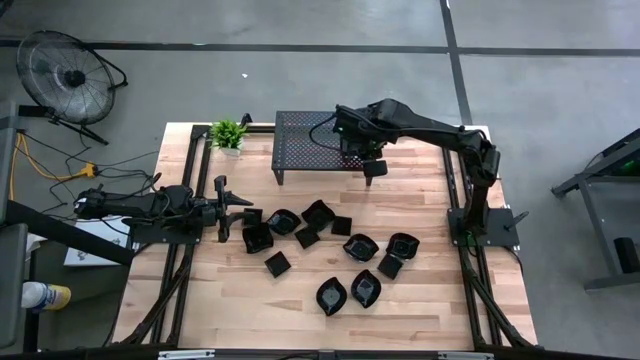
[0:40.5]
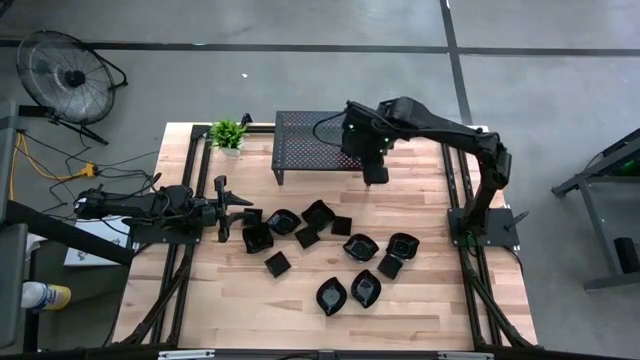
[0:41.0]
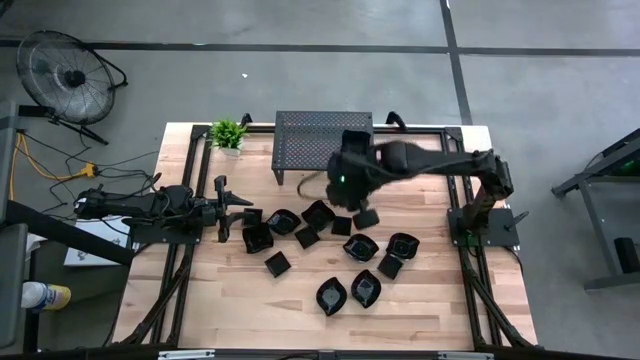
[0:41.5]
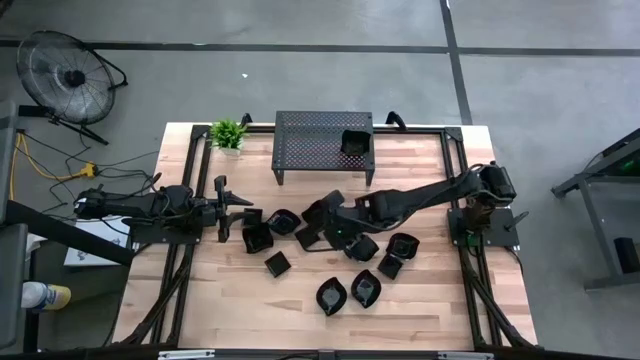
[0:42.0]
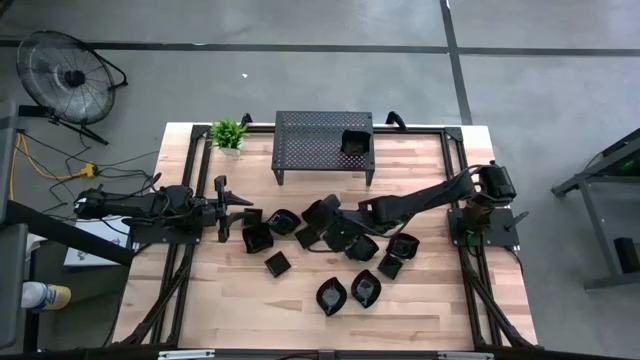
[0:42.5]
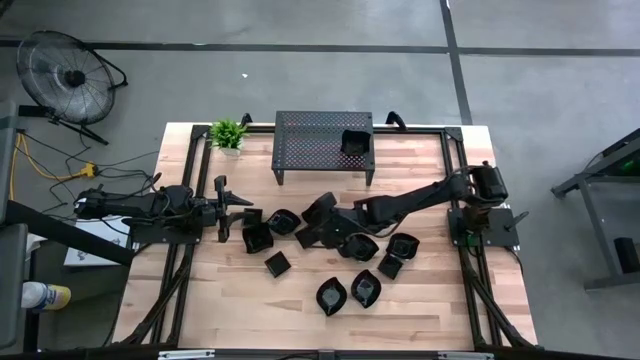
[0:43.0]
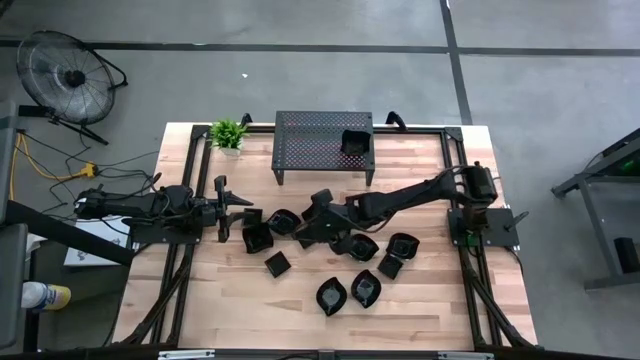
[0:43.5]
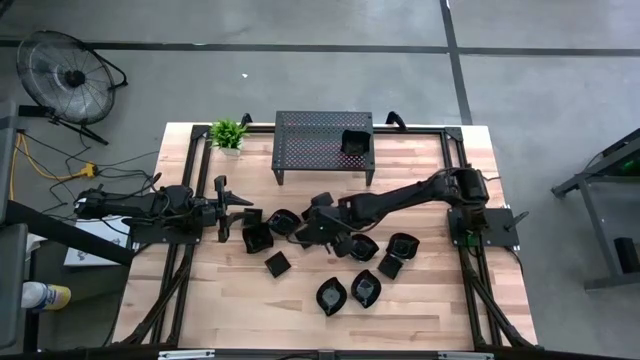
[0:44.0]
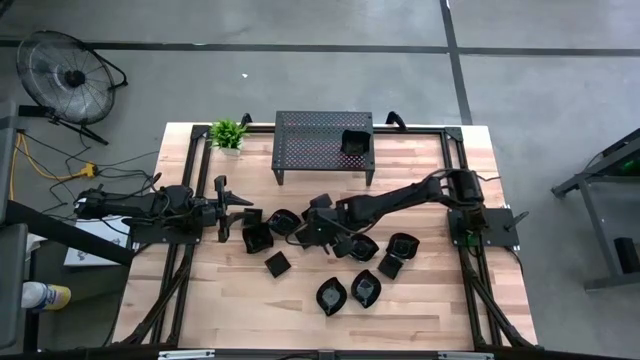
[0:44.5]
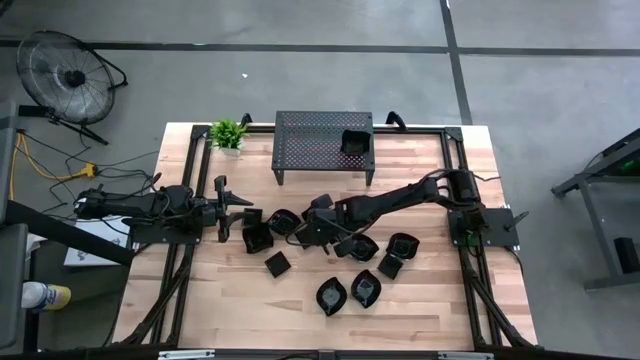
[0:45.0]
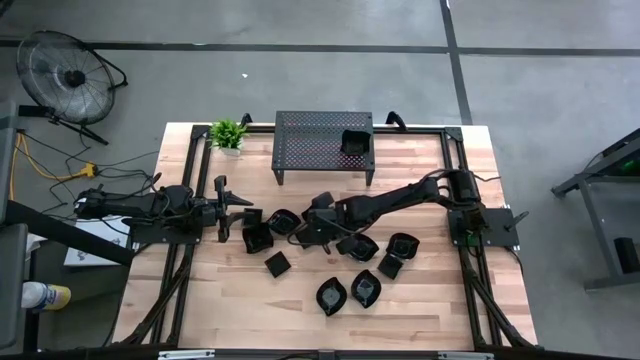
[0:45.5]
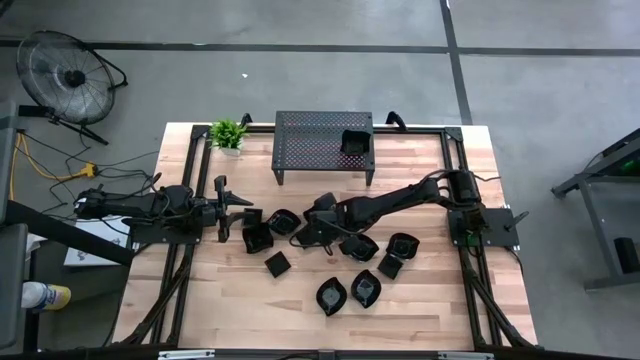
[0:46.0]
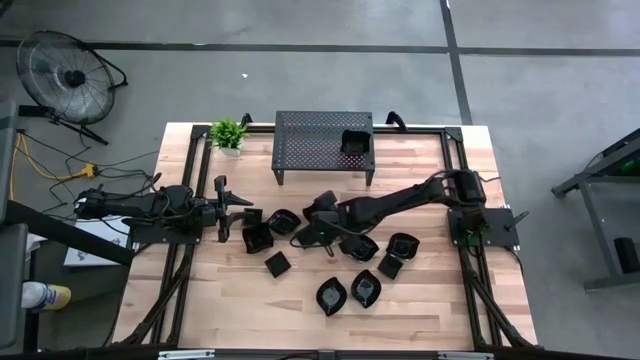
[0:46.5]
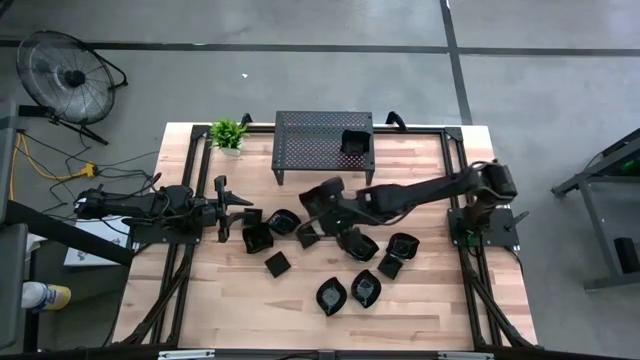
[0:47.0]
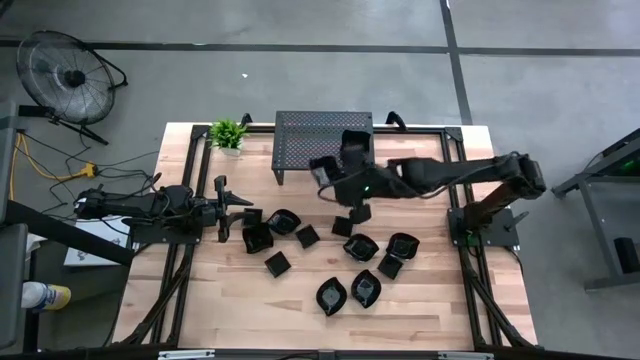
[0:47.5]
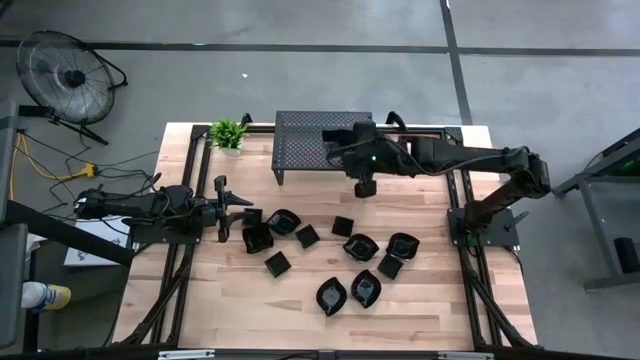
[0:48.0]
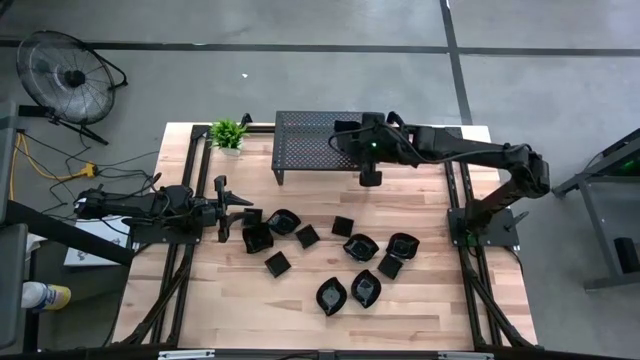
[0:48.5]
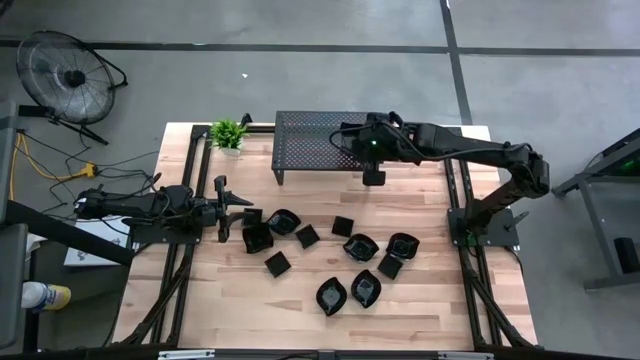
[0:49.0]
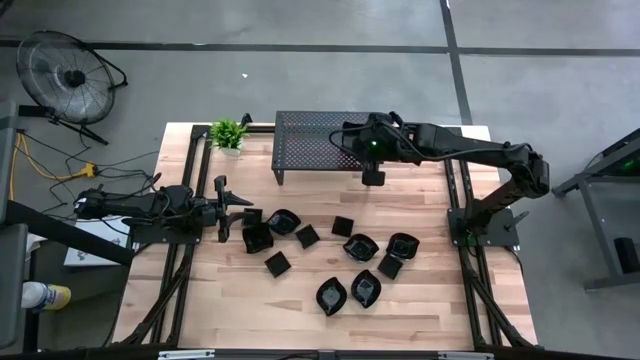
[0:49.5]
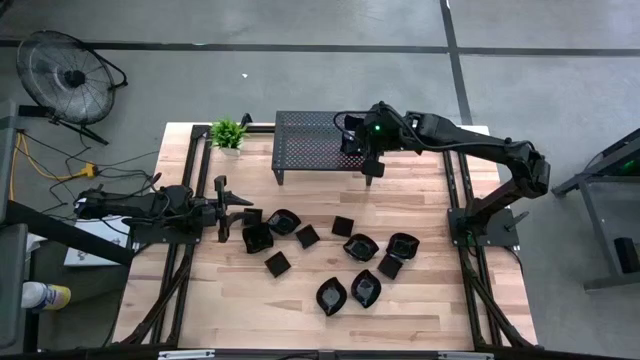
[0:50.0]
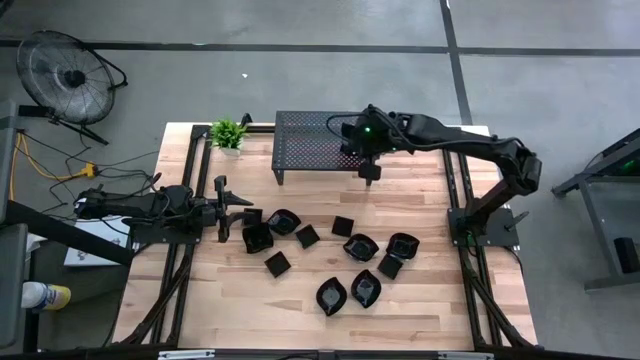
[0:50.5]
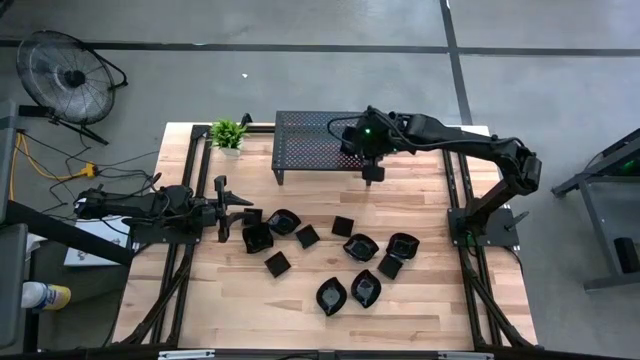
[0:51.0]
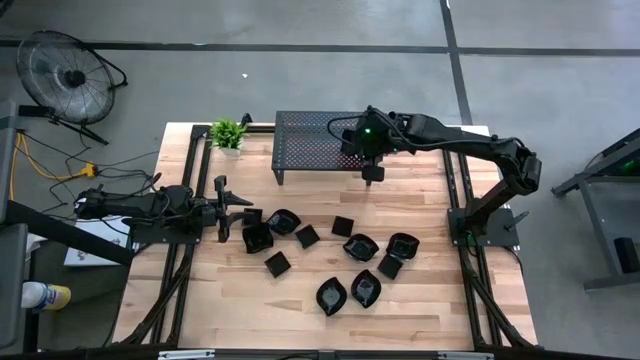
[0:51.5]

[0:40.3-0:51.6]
Task: Pick & Place Mini shaped plates
Stack the distorted square plate on top of the distorted square plate on the shelf

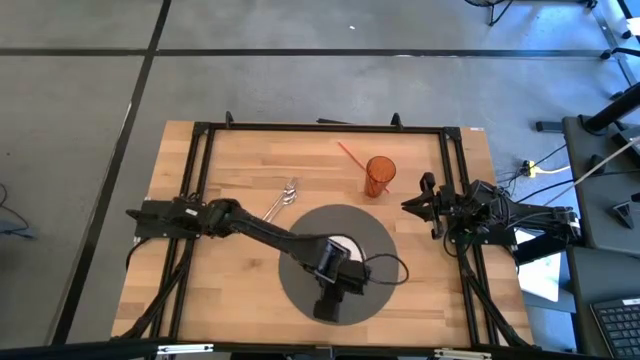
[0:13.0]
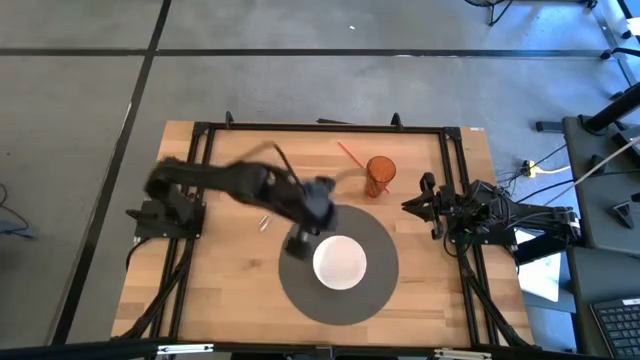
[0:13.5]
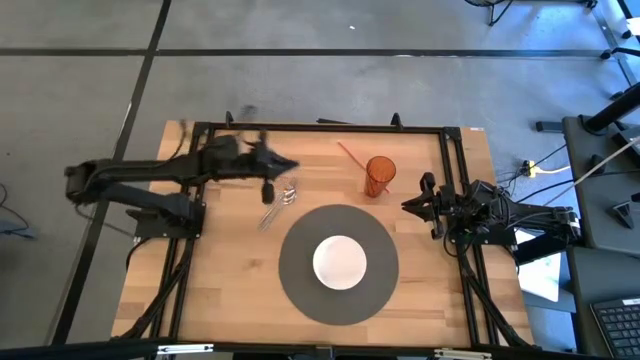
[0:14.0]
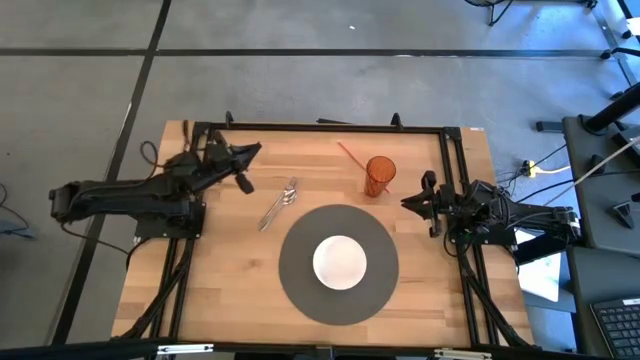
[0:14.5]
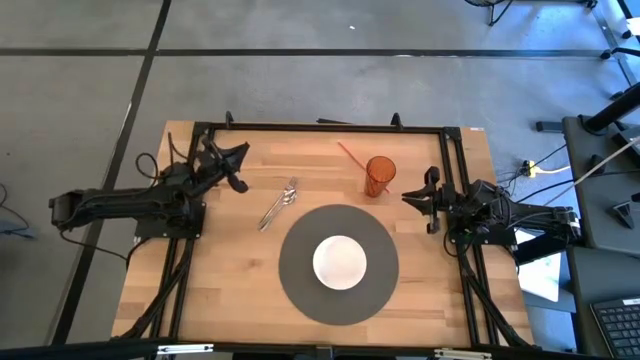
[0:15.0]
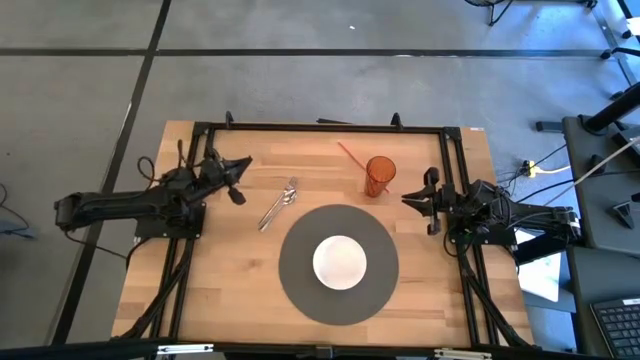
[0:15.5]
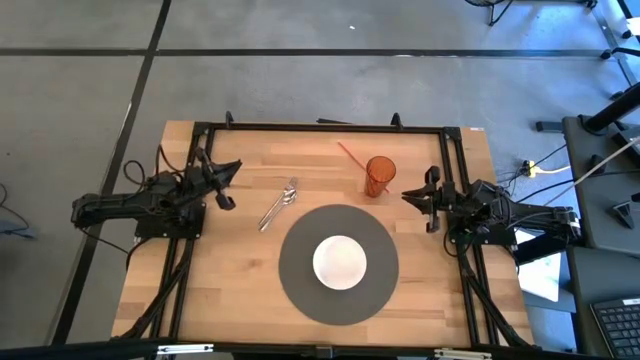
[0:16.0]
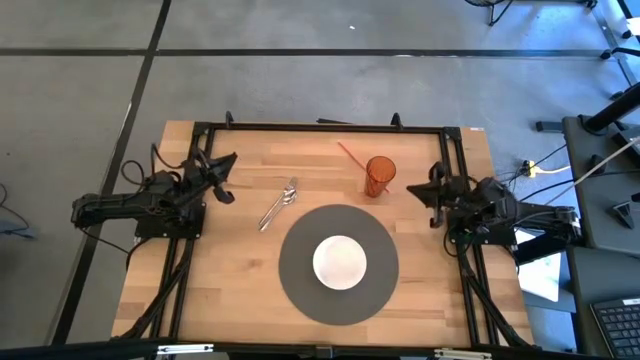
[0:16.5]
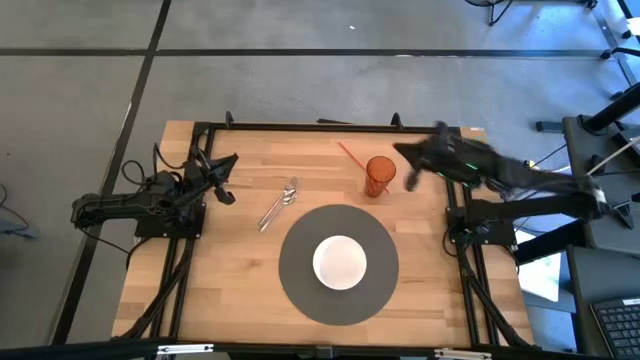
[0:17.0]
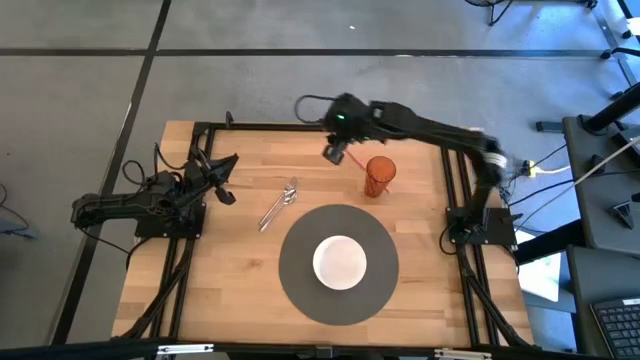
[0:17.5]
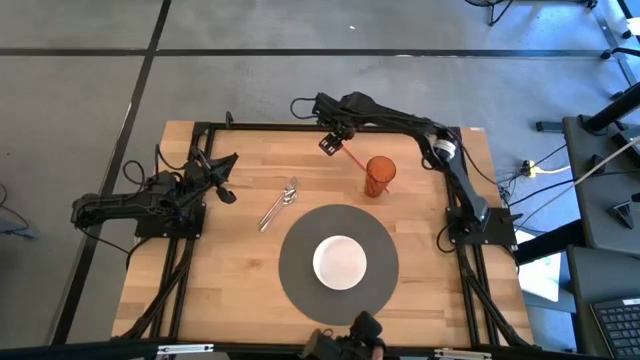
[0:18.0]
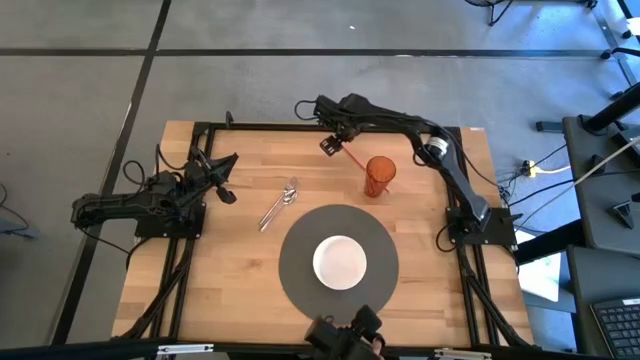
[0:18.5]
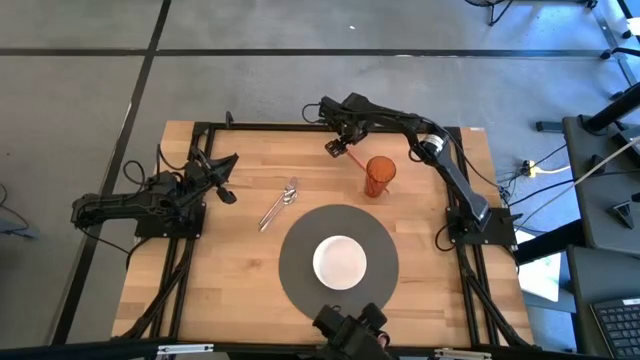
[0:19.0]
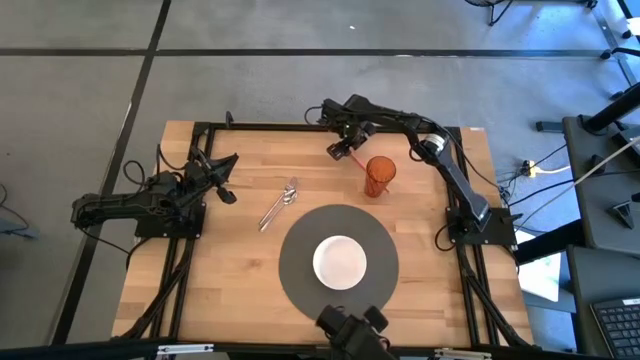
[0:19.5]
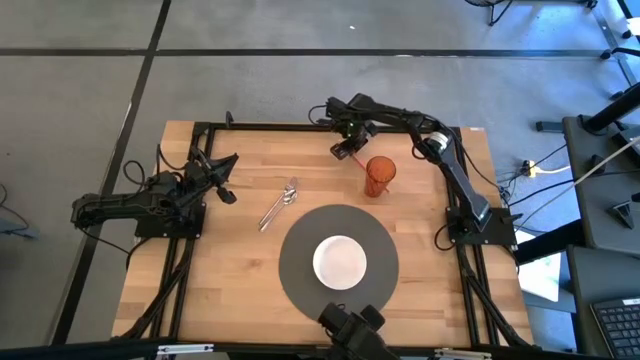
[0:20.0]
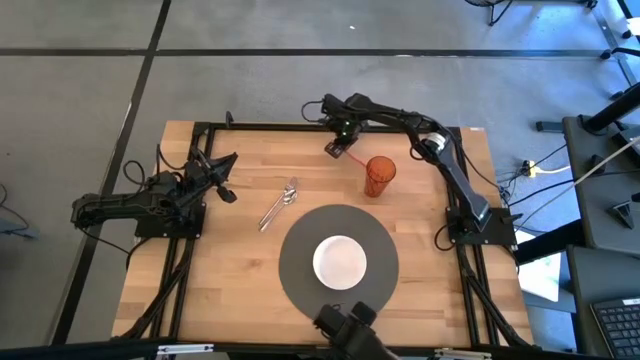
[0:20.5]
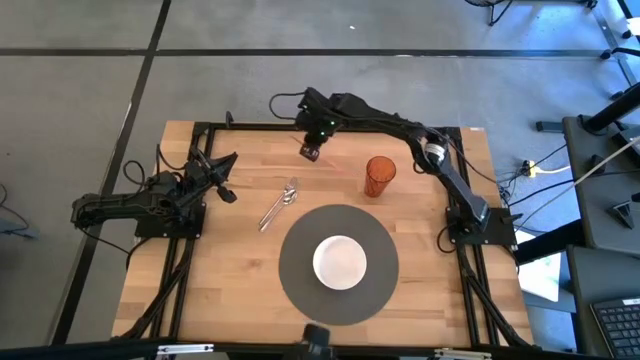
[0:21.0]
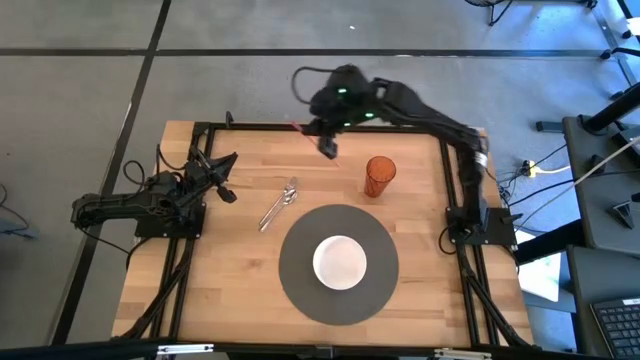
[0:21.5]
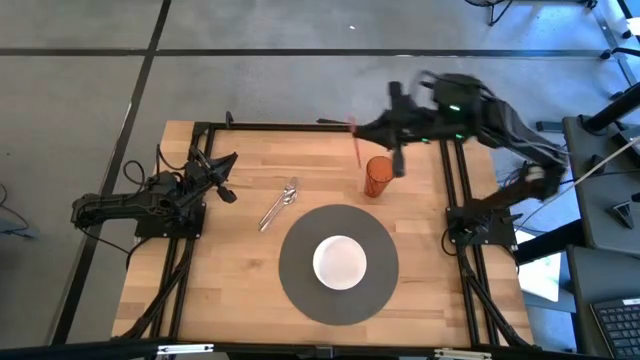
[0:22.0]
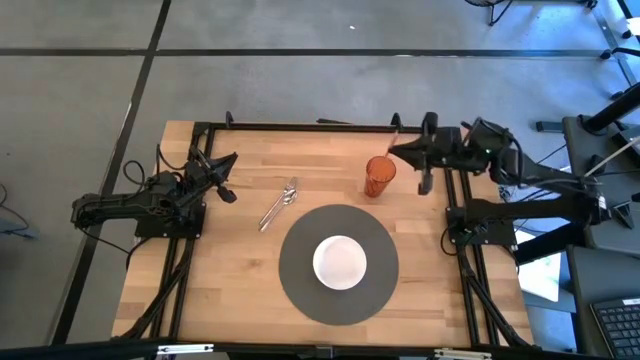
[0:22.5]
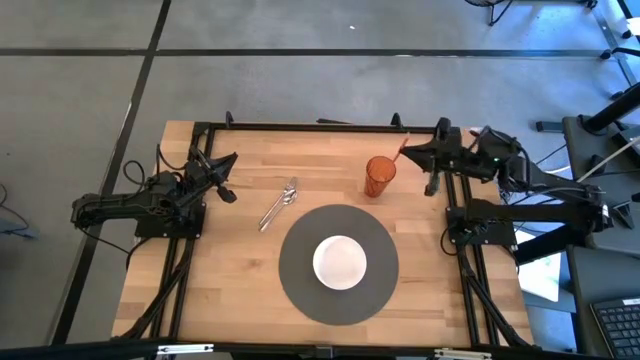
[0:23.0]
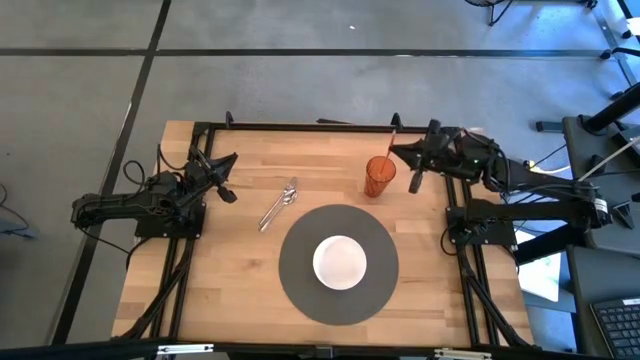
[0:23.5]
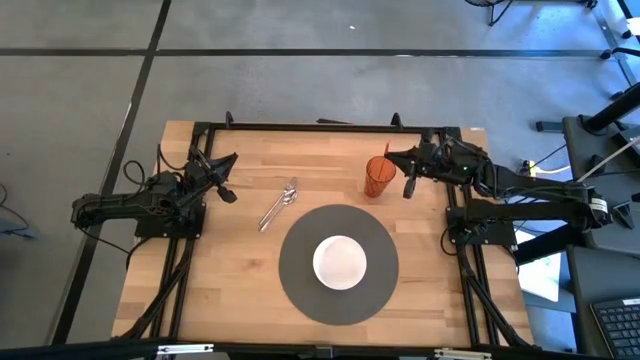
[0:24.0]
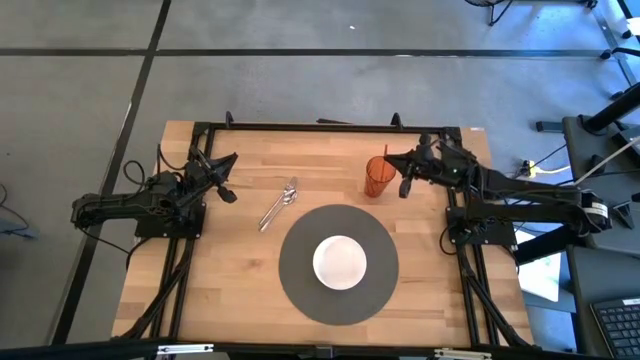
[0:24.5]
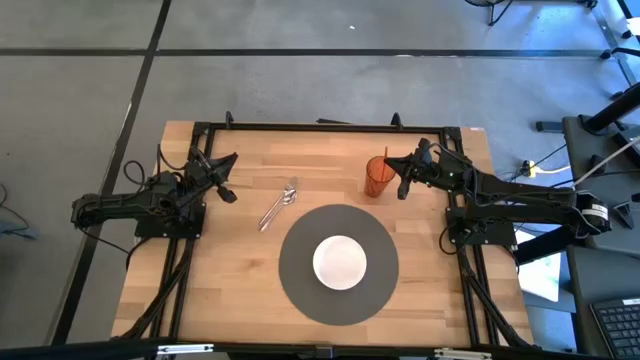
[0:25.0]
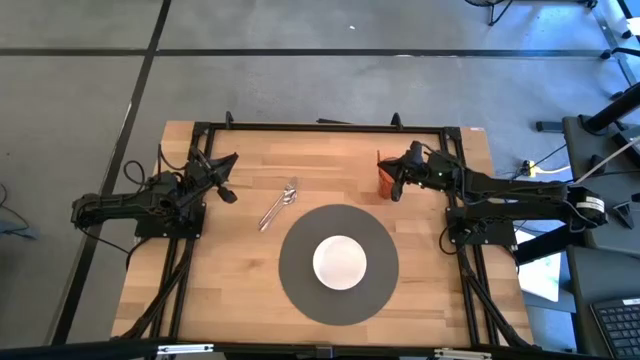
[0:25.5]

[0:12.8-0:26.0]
Task: Pick & Place Utensil
Put the red straw into the orange glass
